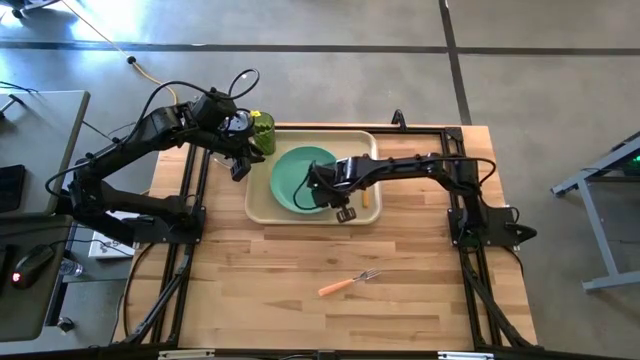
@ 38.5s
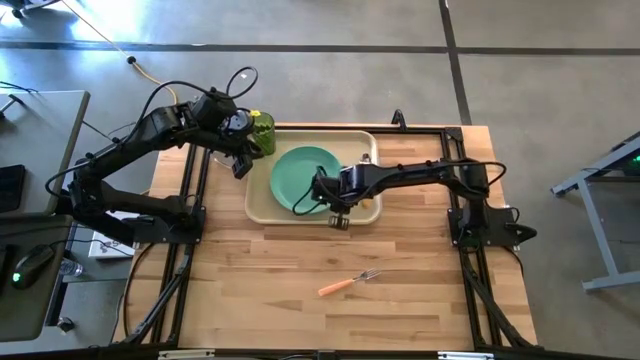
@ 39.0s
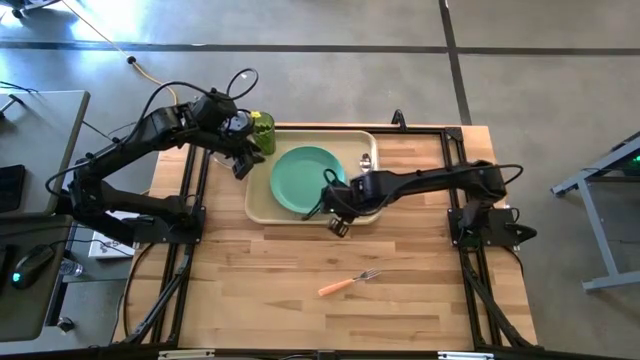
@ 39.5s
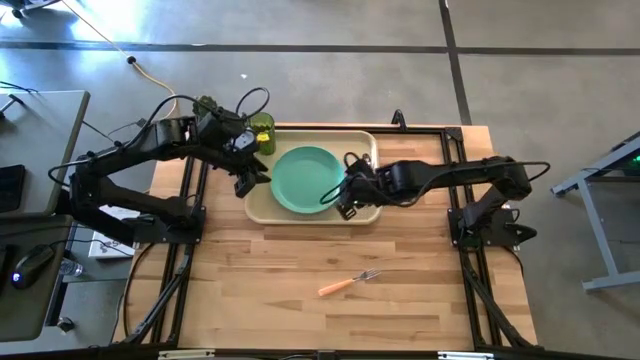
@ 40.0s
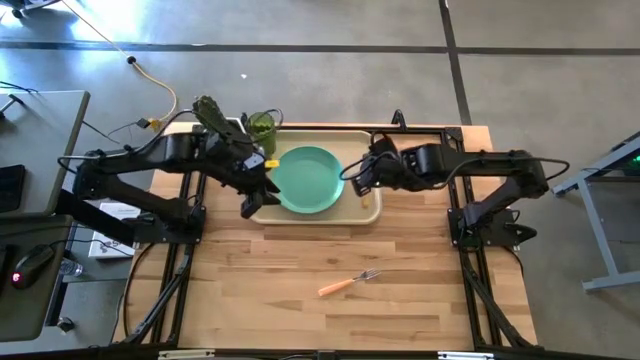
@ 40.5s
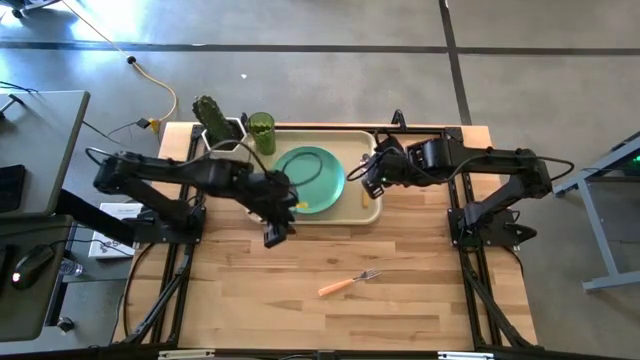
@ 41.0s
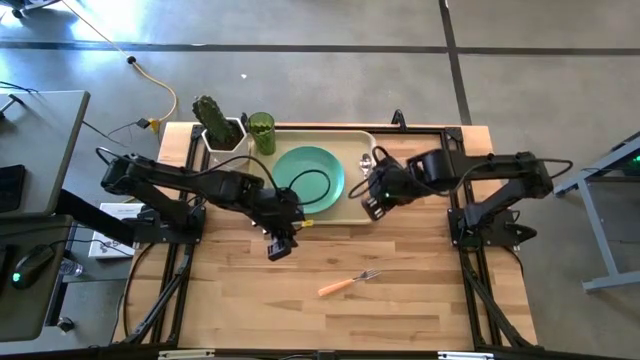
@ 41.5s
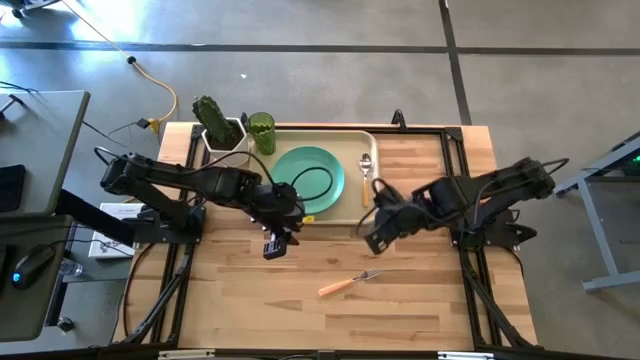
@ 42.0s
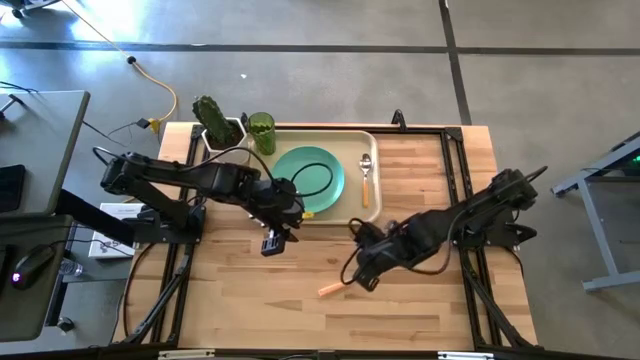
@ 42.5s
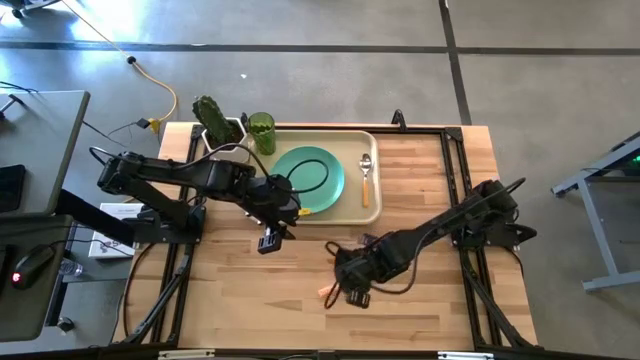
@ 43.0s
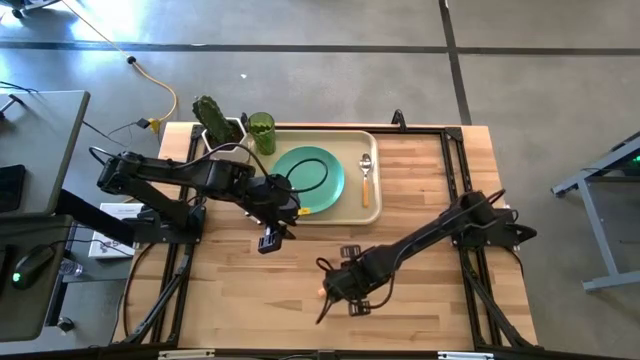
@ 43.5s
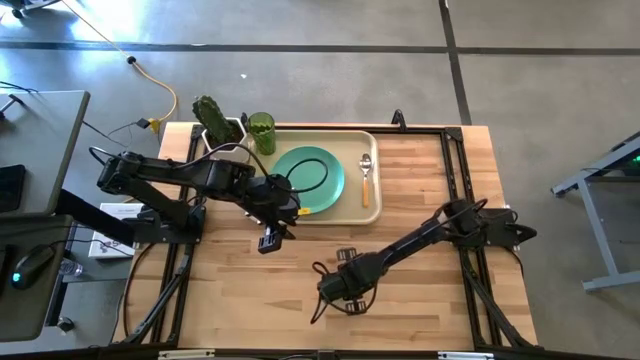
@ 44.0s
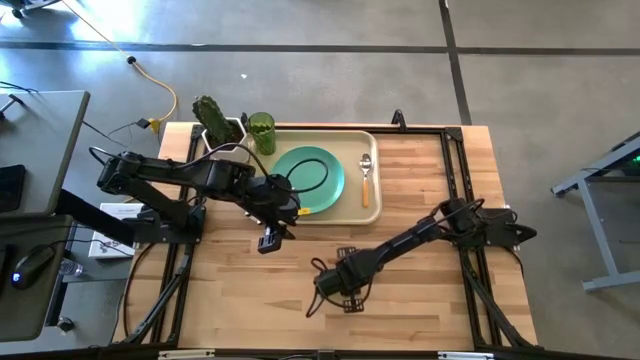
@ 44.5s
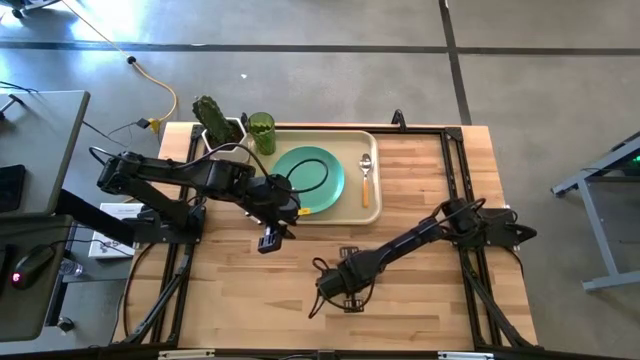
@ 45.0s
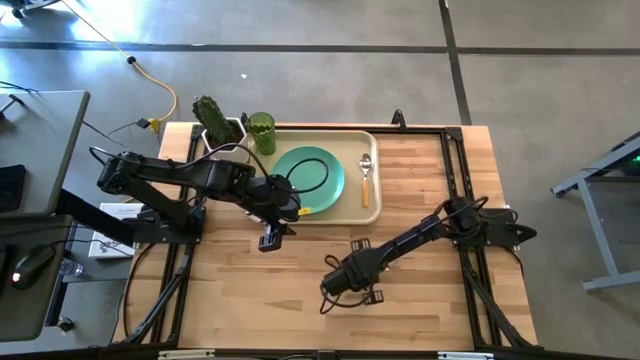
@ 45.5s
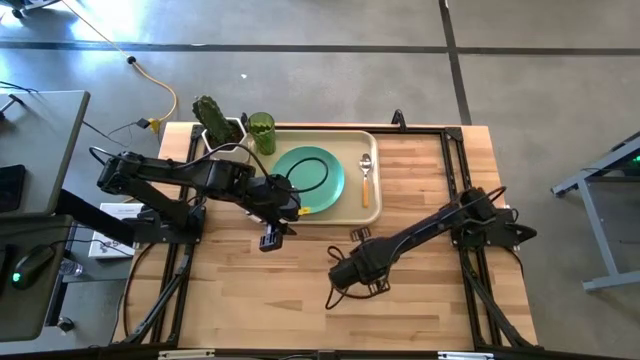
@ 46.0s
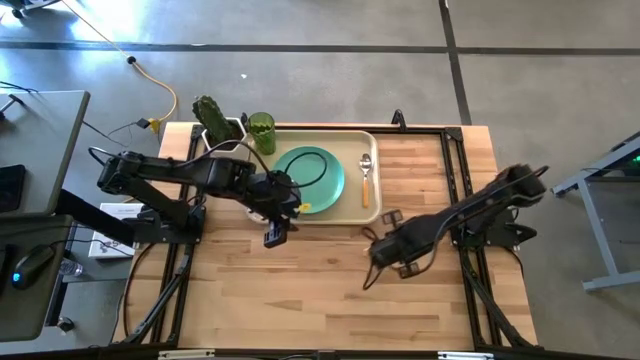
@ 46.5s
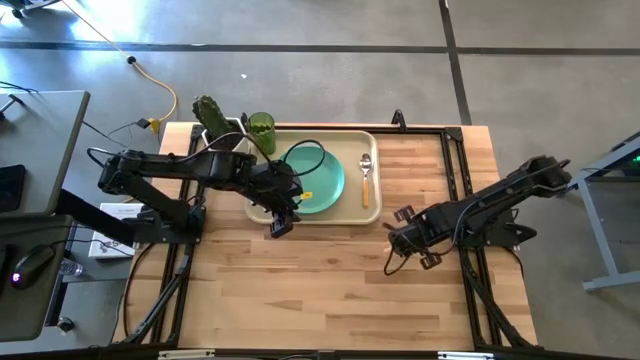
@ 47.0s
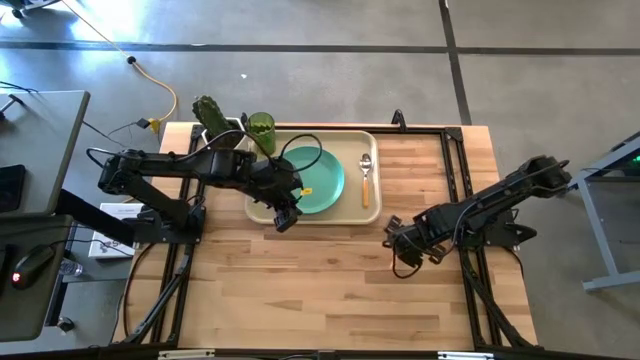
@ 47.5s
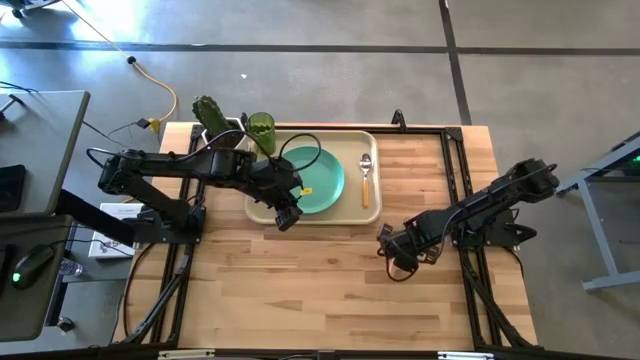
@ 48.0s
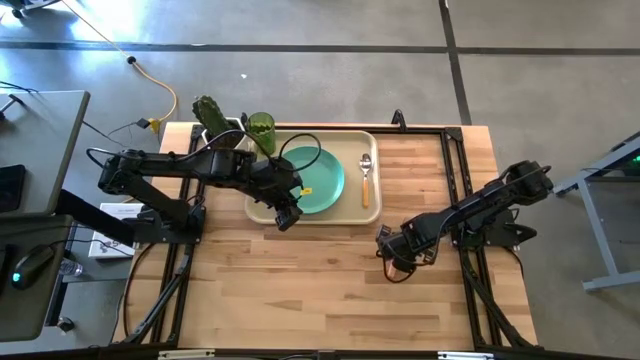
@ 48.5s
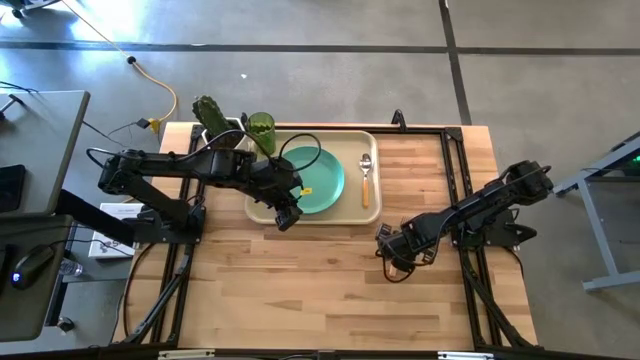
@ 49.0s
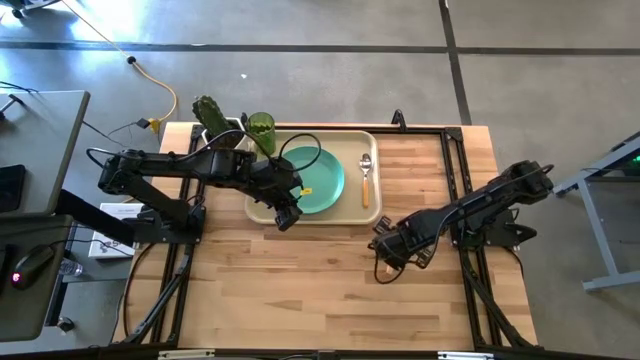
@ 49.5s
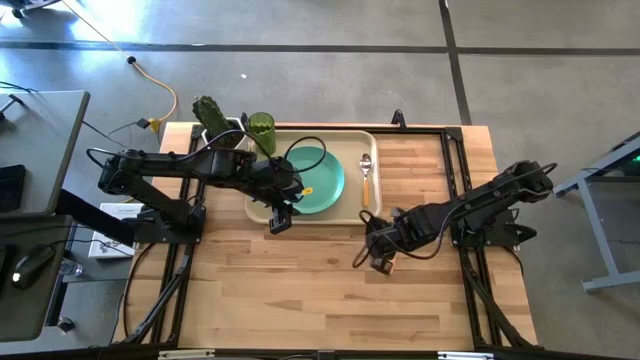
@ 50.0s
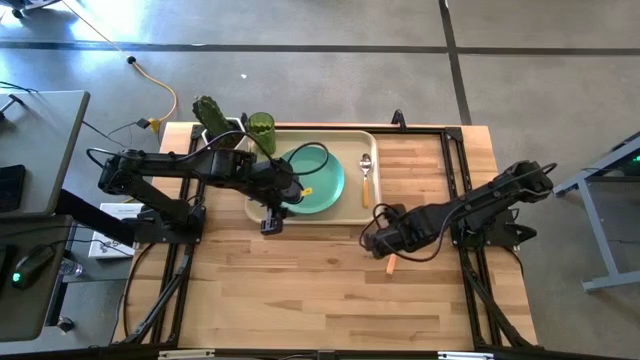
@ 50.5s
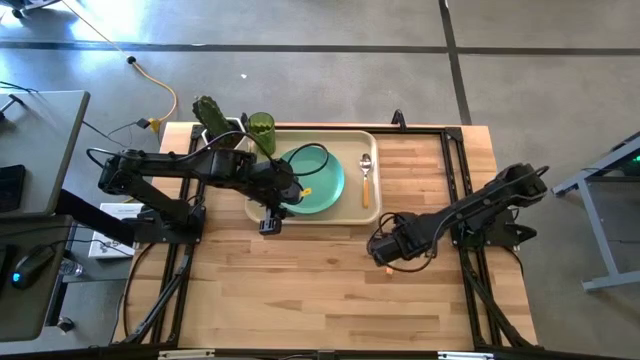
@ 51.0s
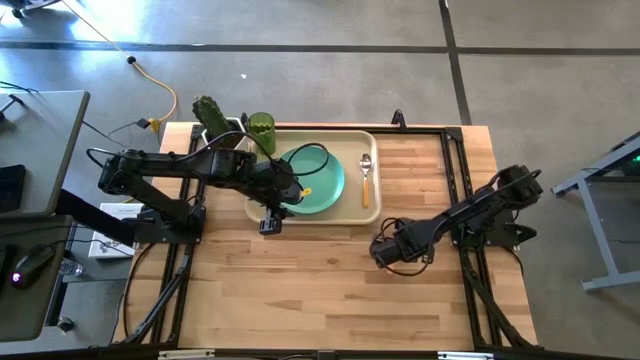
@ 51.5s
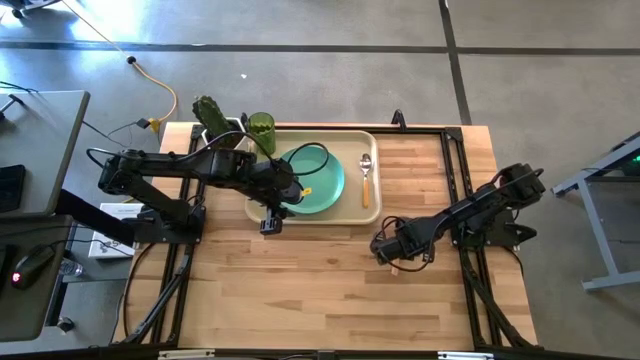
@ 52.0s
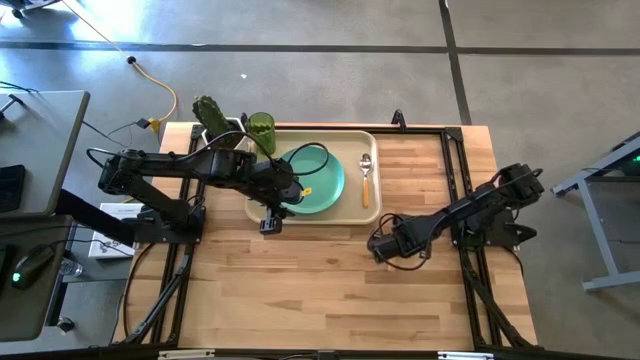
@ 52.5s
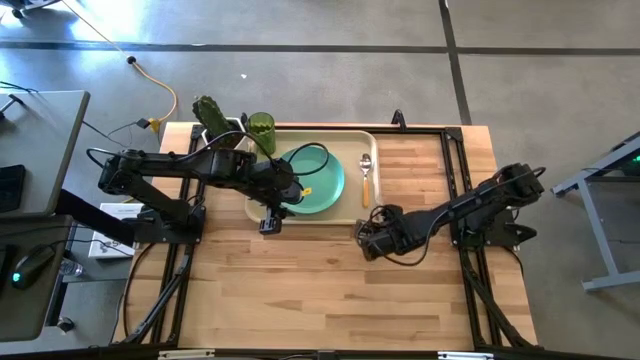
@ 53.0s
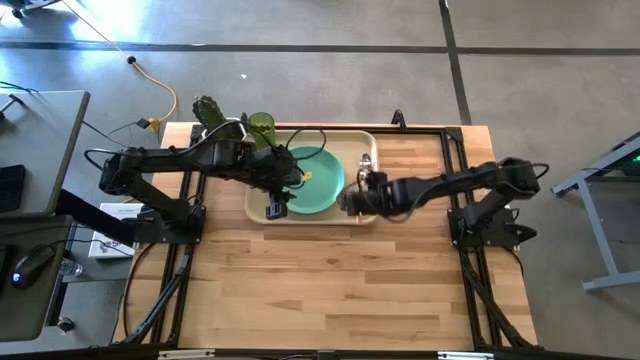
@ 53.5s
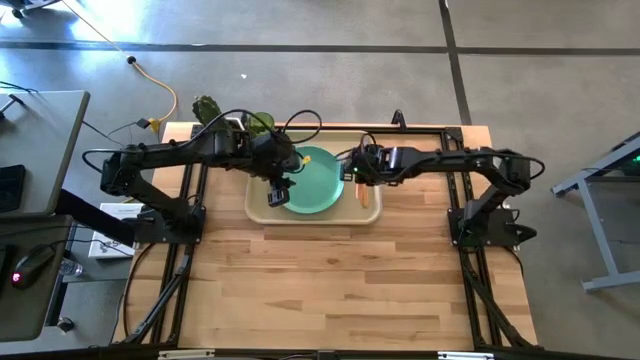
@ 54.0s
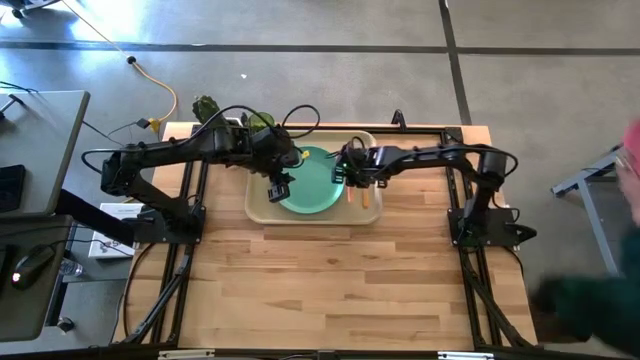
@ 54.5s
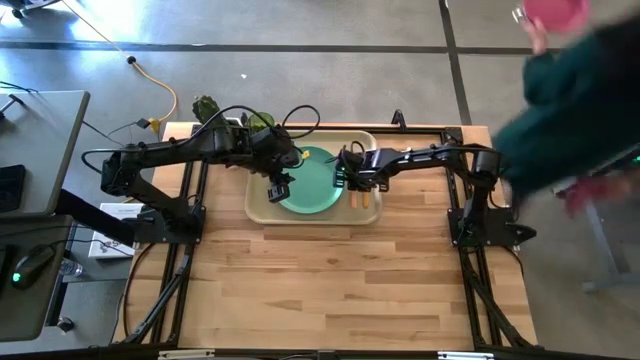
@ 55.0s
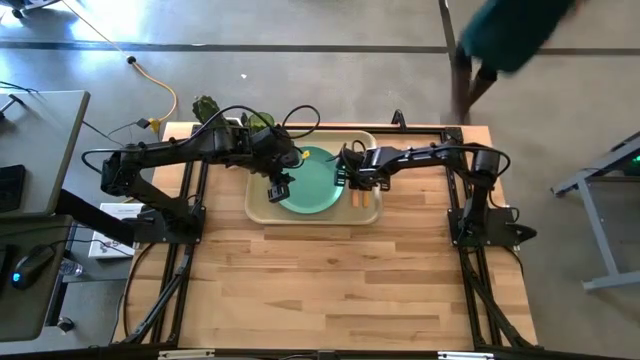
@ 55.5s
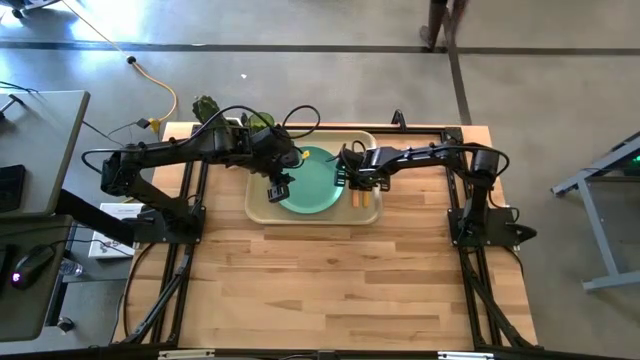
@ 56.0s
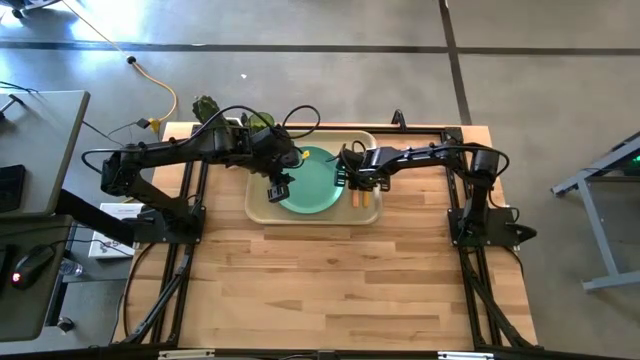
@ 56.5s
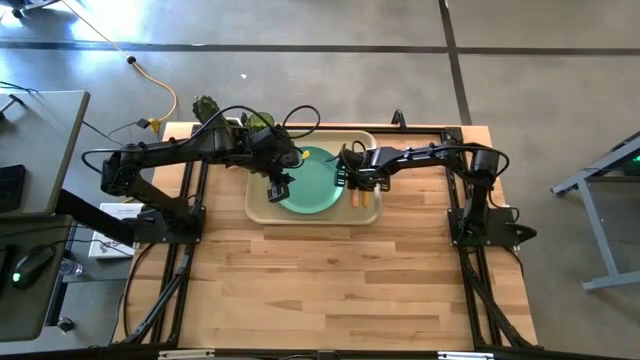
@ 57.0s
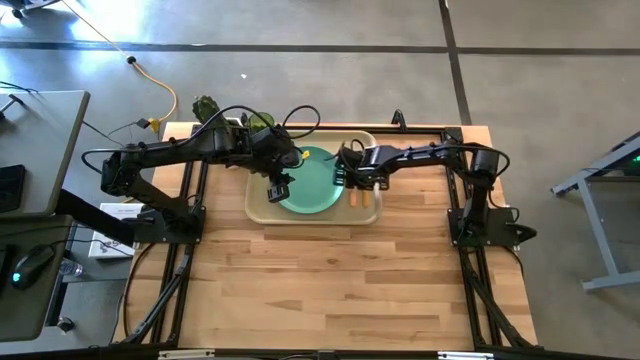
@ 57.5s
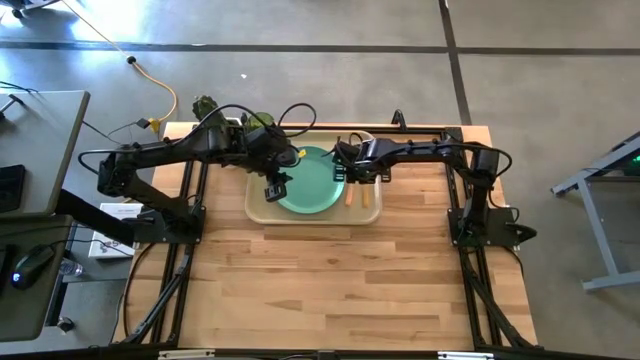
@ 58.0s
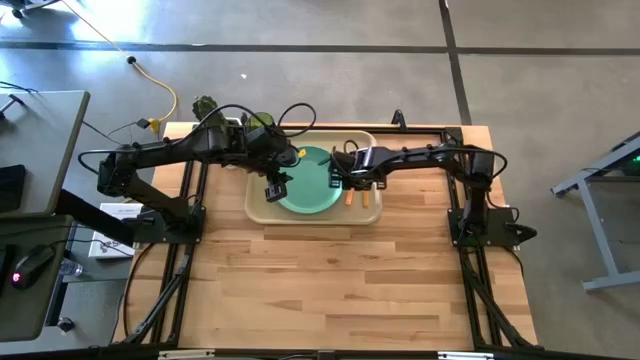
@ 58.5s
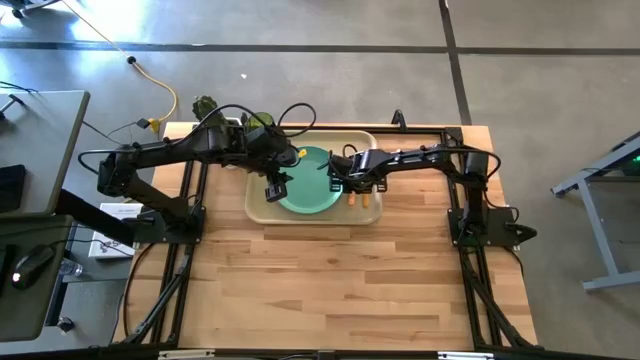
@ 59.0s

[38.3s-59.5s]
Task: Pick and place plate/cup/fork/spoon on tray
Put the light pink fork on the white serving tray

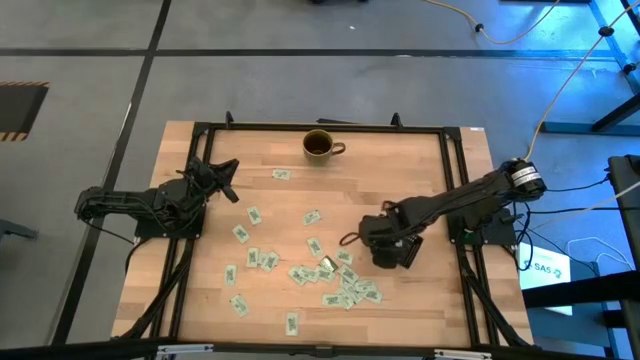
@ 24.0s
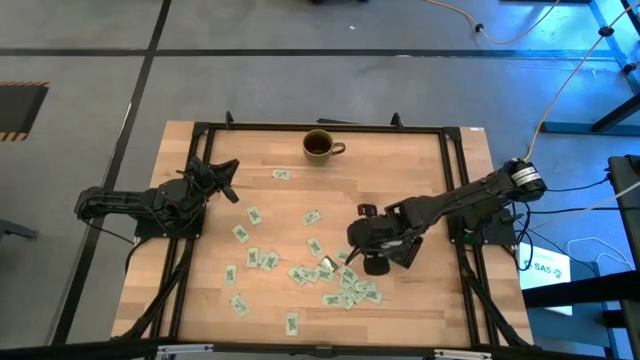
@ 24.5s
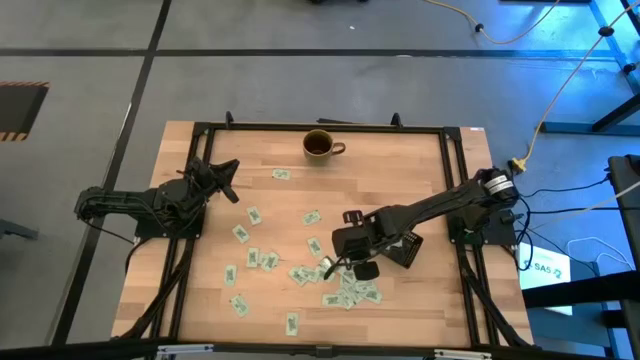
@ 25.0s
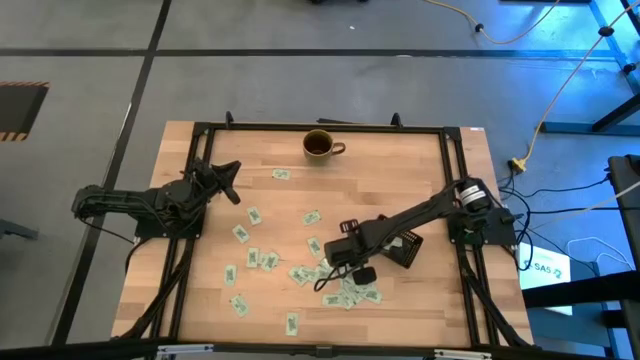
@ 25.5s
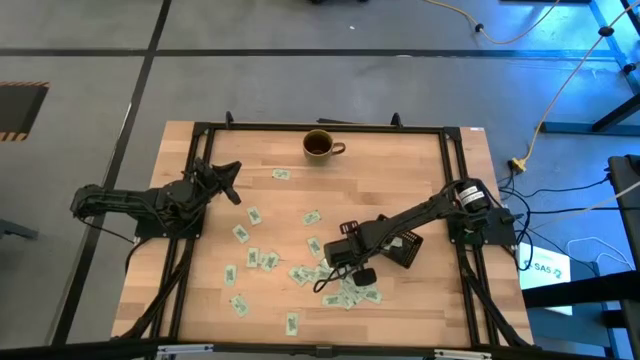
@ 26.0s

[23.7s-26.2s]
Task: Pick and place Stevia / Truvia into bins
Put the stevia packet into the black bin
